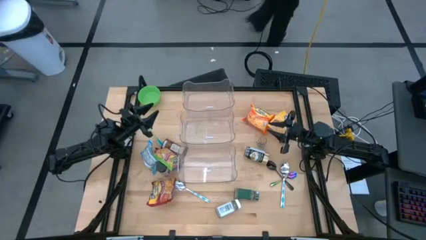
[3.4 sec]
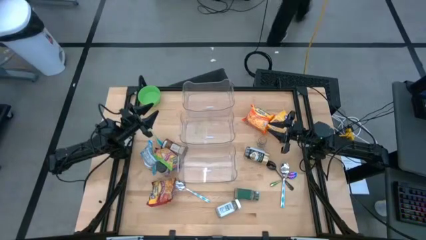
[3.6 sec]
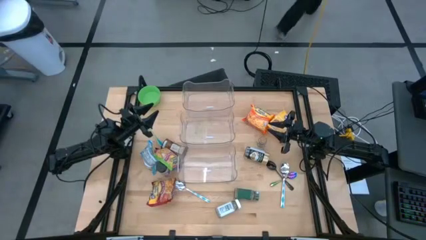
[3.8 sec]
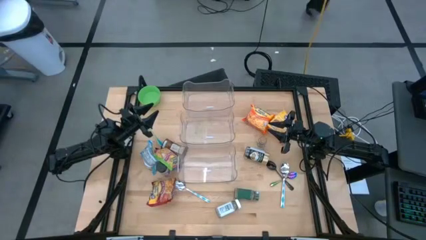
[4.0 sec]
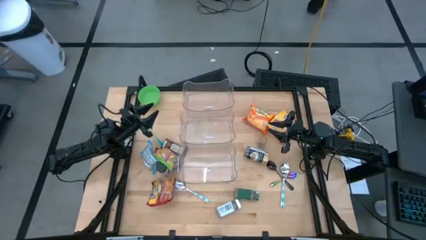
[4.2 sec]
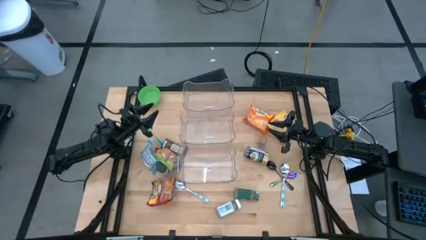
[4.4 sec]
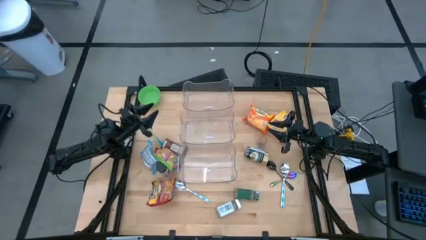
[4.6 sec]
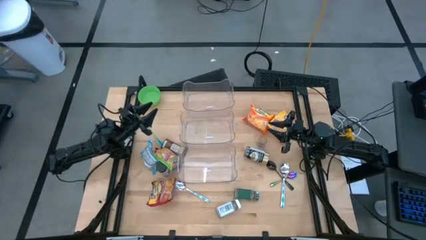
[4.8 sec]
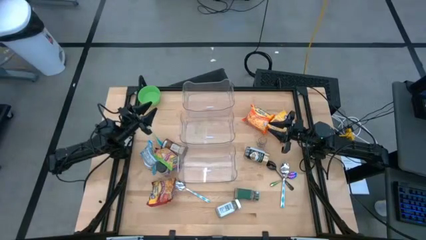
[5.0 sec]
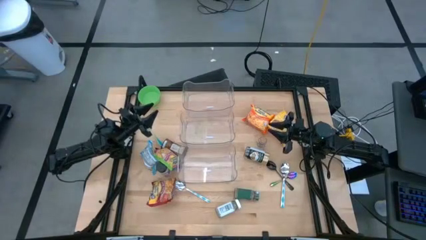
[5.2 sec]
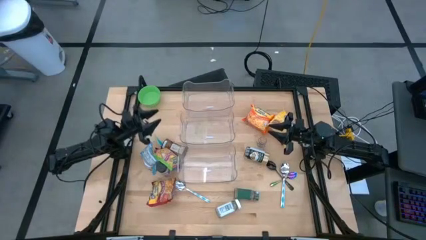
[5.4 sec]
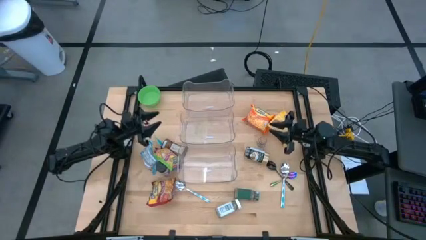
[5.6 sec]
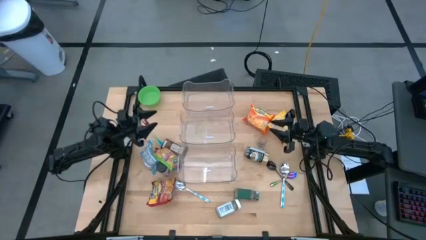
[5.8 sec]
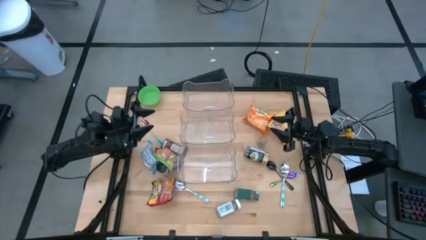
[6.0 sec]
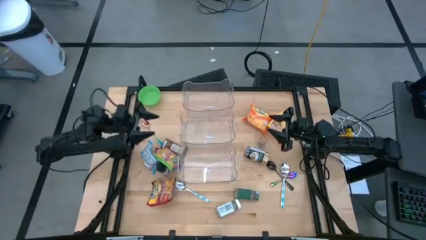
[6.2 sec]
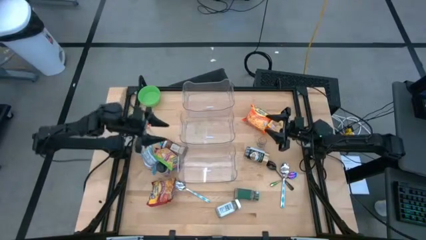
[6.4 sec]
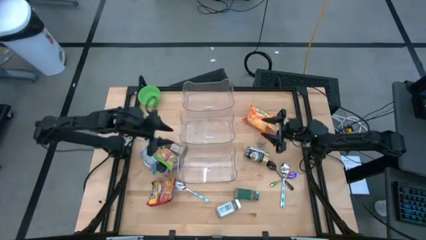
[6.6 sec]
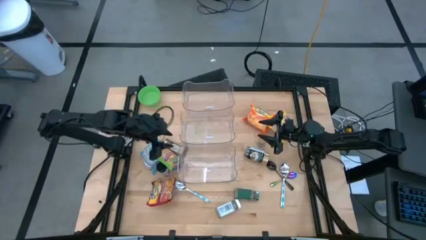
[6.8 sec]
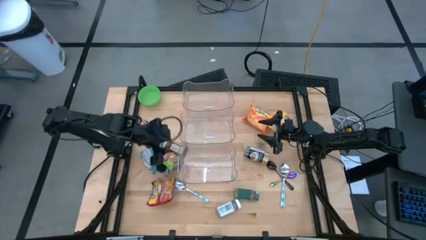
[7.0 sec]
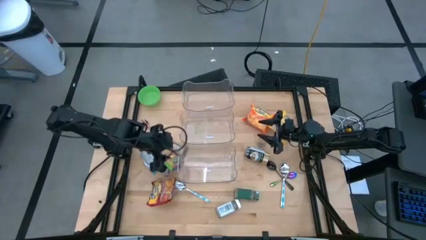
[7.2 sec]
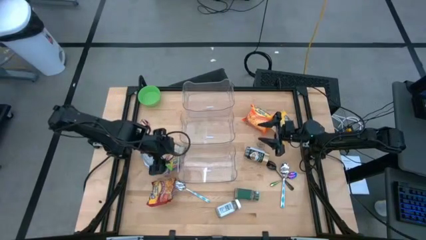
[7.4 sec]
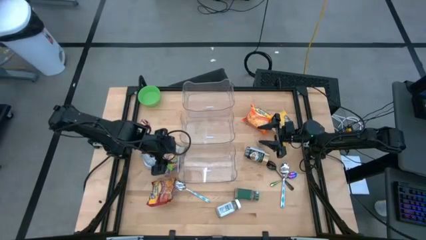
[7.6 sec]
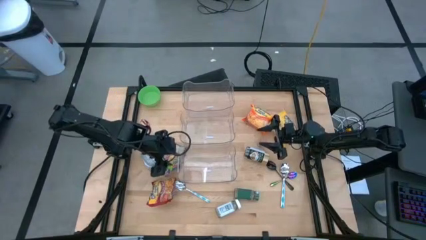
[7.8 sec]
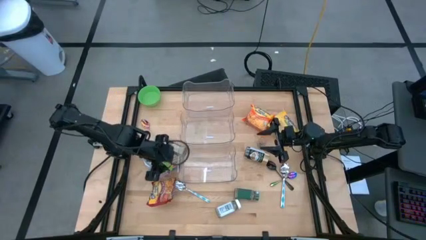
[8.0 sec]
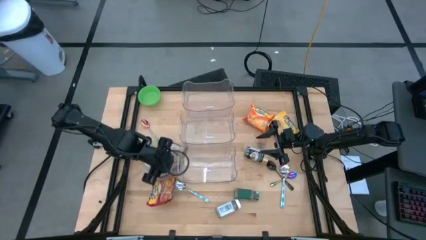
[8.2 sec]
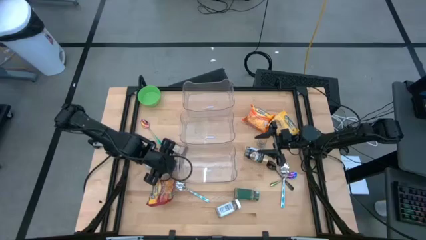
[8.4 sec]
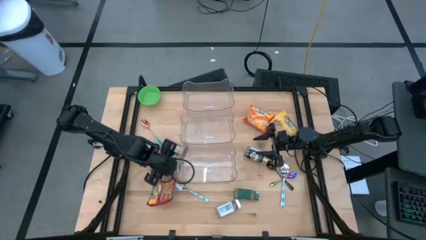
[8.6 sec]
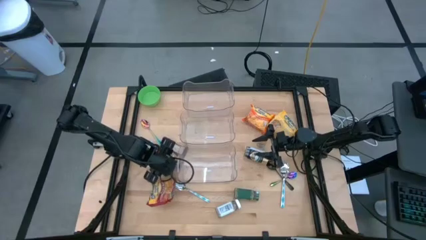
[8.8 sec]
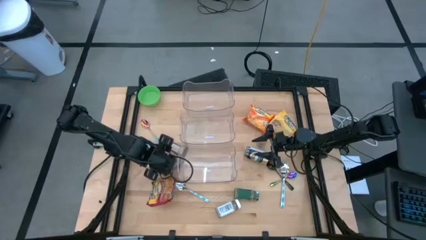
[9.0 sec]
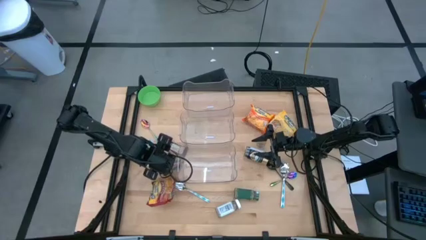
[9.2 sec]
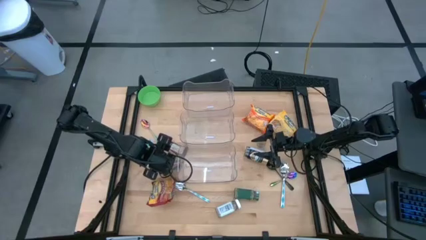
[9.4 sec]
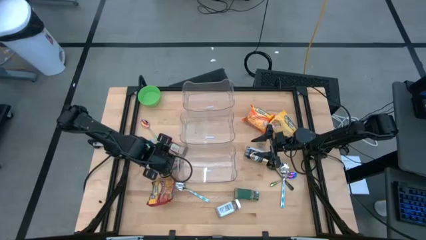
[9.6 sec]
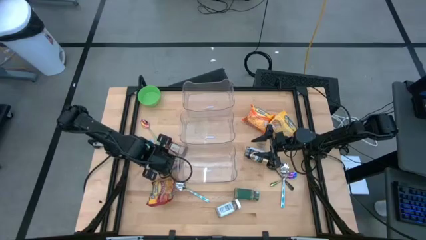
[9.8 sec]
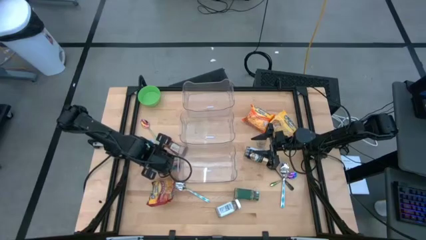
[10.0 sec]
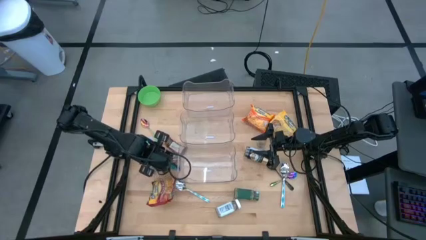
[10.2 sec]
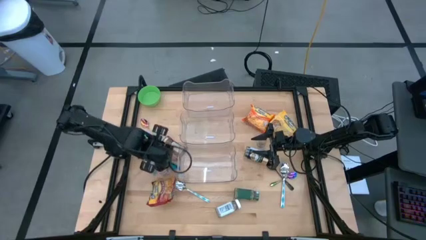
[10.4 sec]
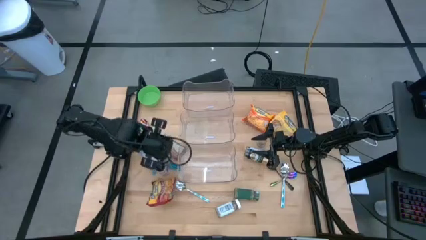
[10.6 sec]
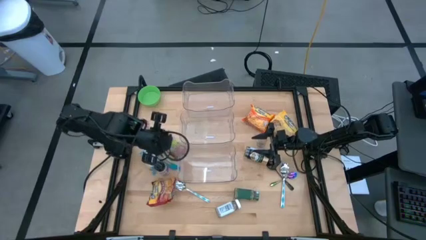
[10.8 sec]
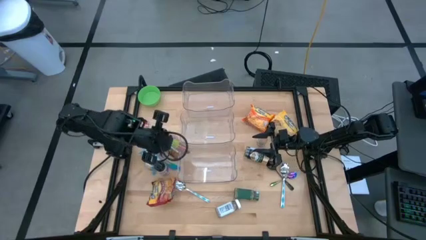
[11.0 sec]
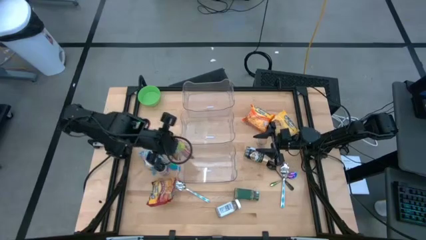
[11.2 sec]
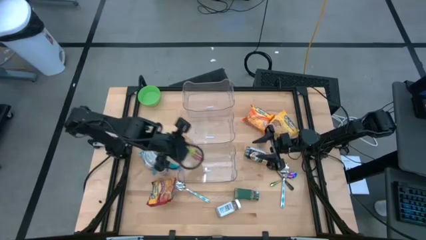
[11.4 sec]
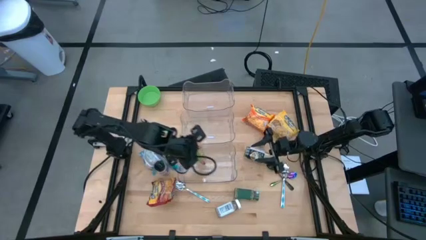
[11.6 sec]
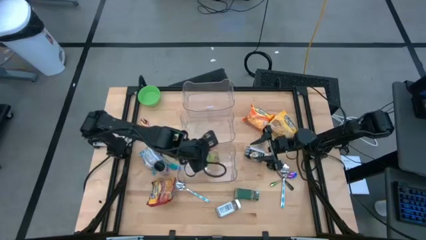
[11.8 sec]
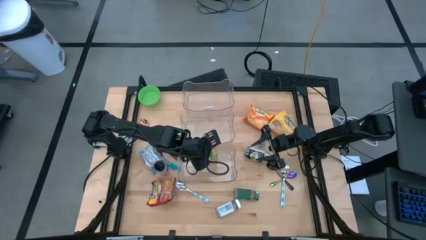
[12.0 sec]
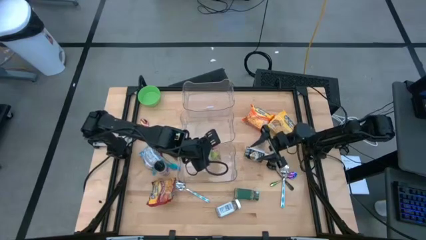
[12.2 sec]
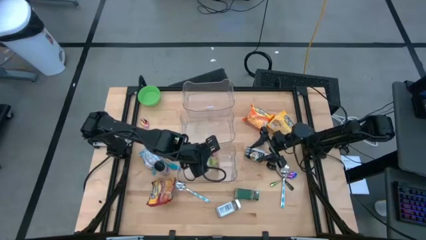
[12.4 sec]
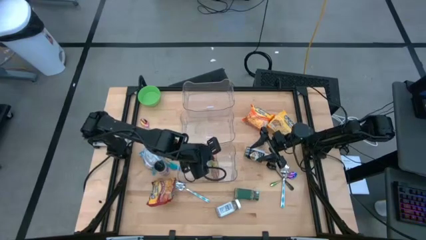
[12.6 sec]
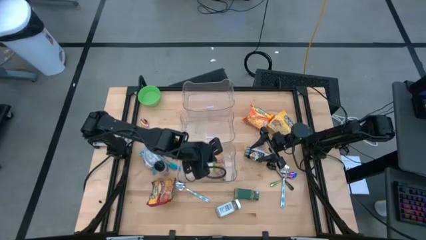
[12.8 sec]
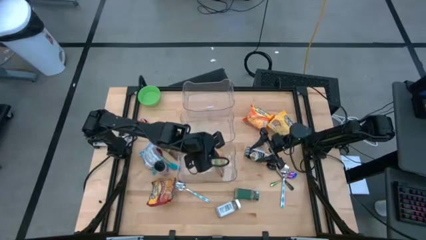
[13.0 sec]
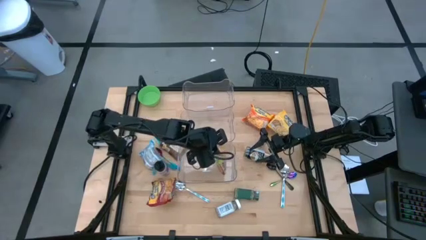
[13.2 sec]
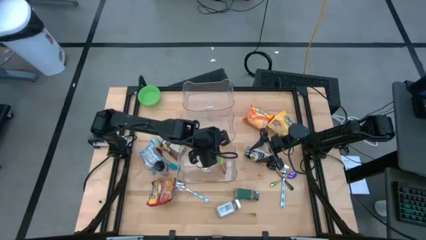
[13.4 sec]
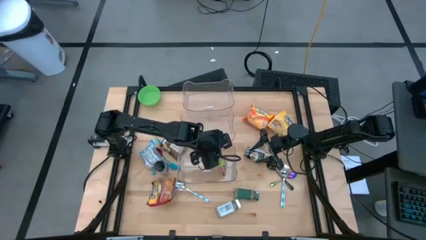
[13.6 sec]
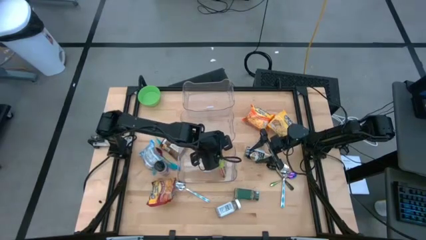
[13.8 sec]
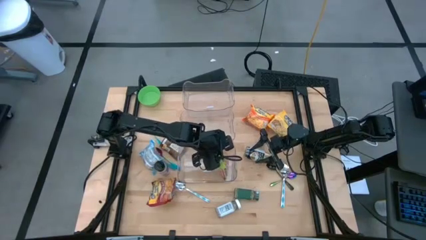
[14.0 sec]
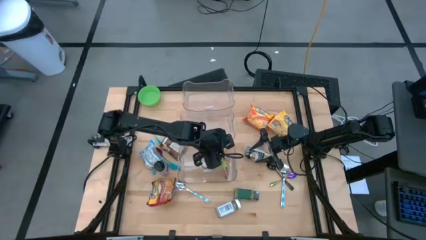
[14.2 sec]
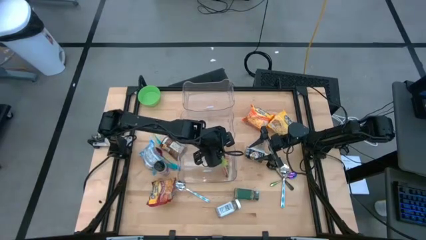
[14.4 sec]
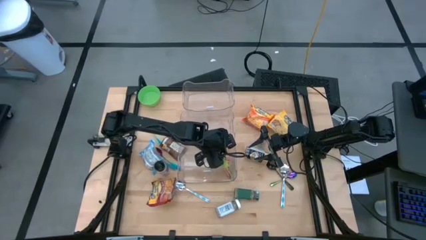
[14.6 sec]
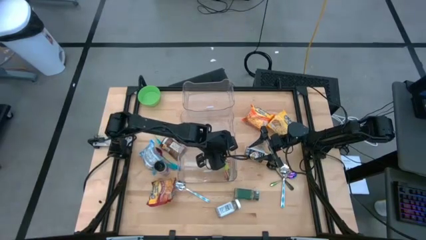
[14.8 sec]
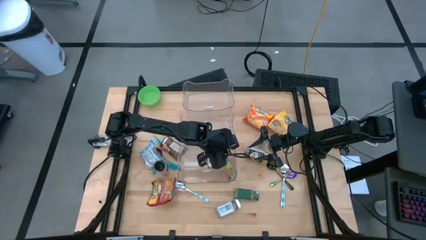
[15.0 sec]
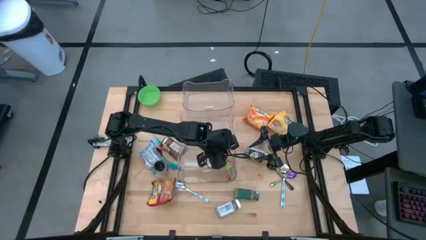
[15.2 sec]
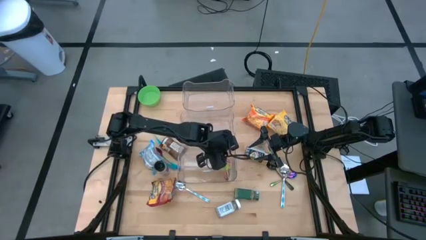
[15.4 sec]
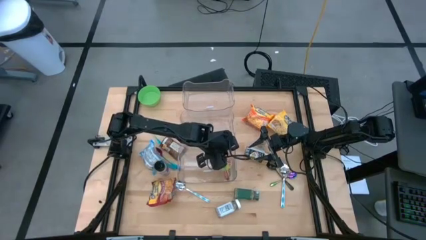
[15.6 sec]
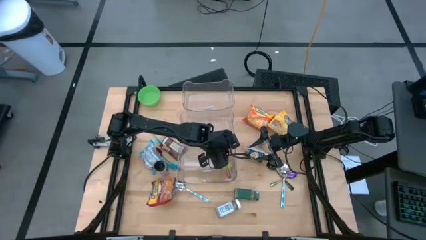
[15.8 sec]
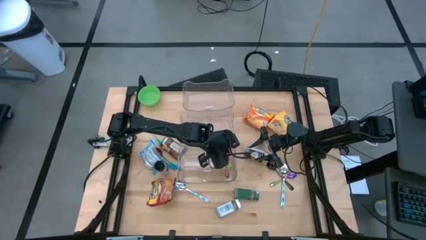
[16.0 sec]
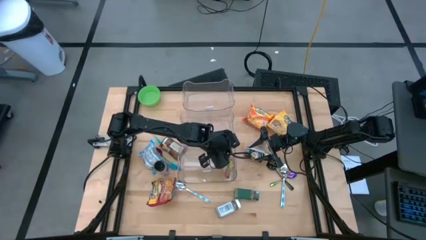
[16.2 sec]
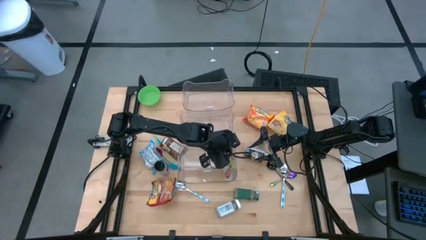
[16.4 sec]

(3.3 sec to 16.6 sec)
Task: Pick & Place Food Item
Put the green noodle pack into the bottom transparent bin

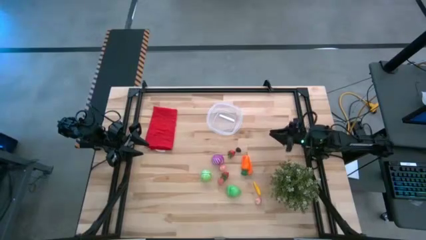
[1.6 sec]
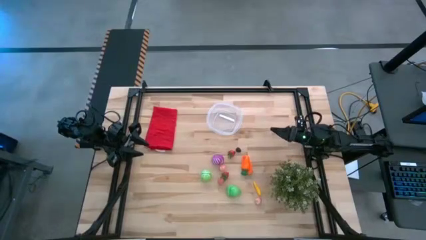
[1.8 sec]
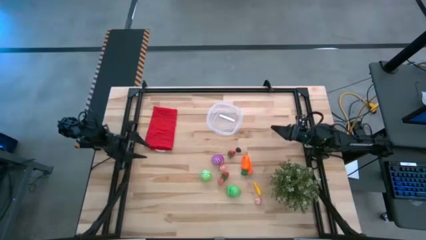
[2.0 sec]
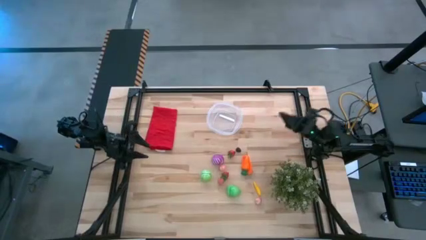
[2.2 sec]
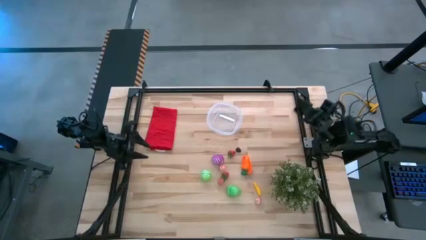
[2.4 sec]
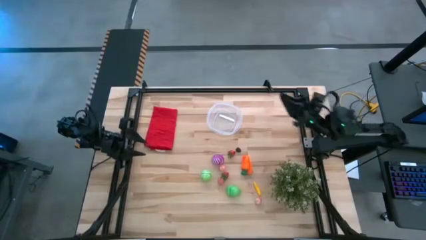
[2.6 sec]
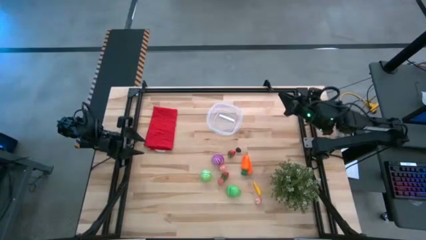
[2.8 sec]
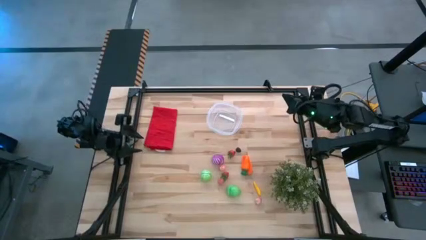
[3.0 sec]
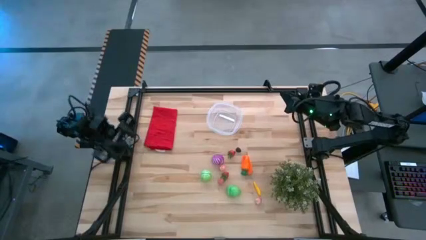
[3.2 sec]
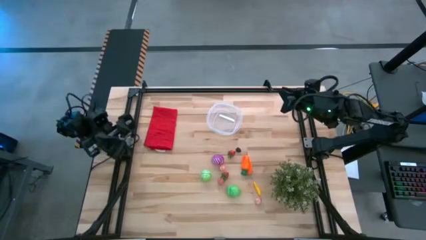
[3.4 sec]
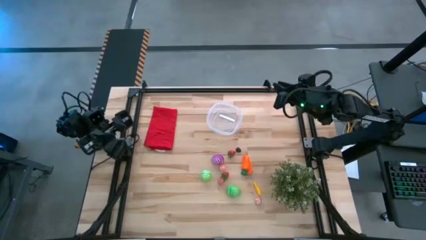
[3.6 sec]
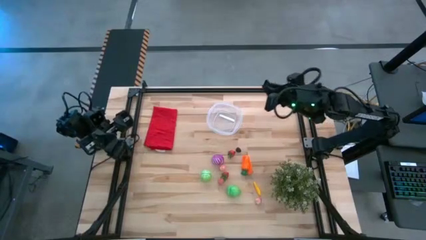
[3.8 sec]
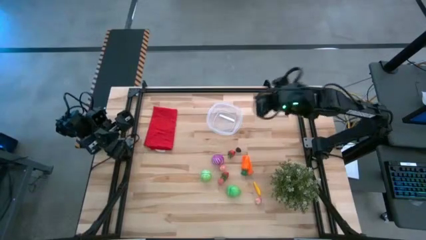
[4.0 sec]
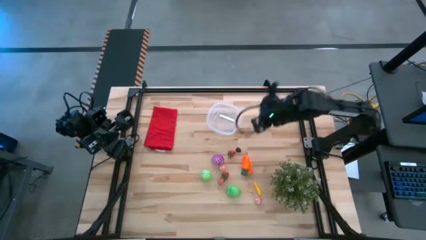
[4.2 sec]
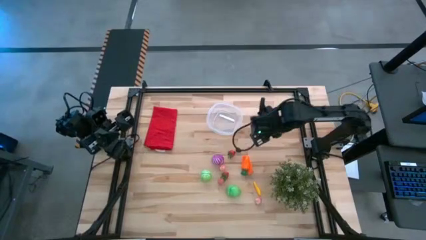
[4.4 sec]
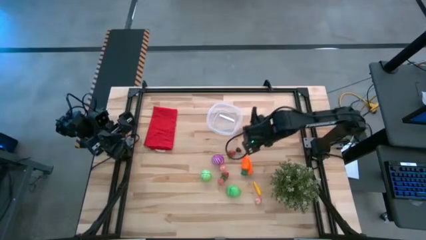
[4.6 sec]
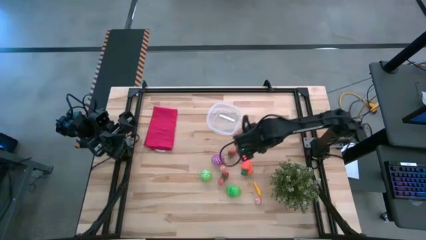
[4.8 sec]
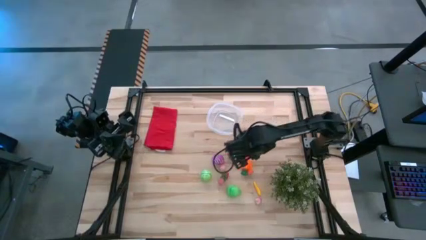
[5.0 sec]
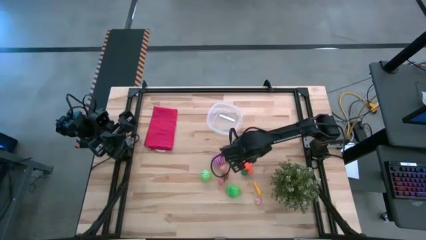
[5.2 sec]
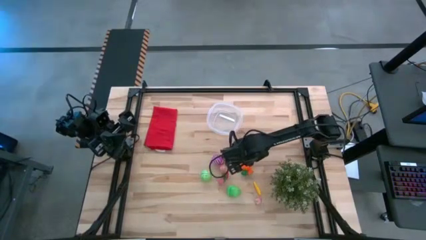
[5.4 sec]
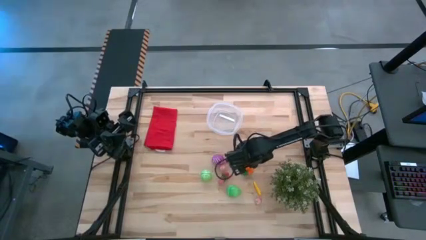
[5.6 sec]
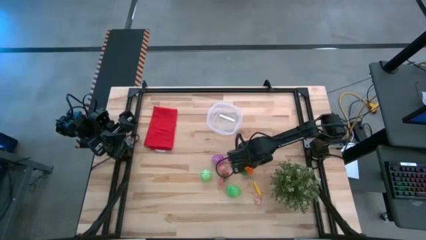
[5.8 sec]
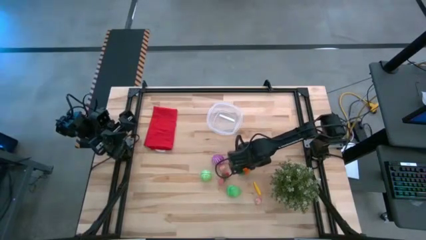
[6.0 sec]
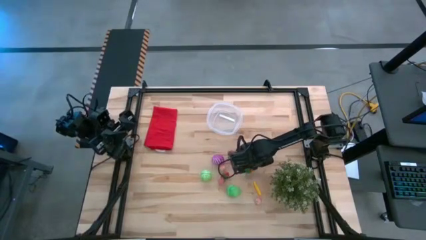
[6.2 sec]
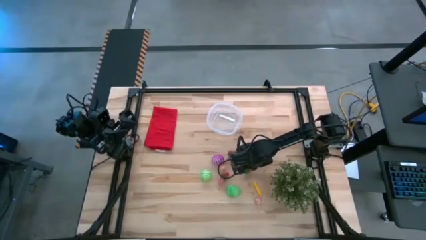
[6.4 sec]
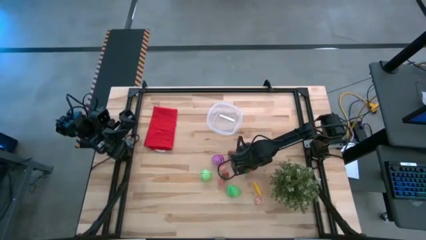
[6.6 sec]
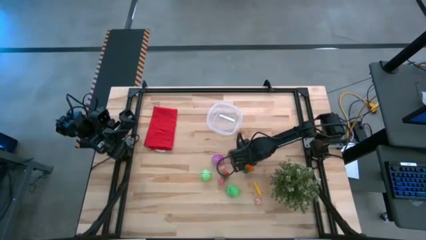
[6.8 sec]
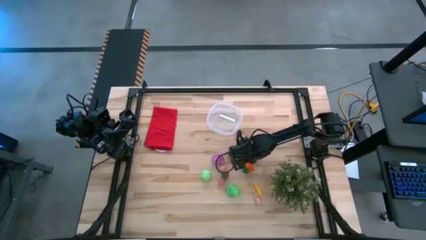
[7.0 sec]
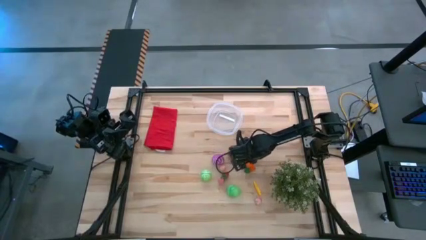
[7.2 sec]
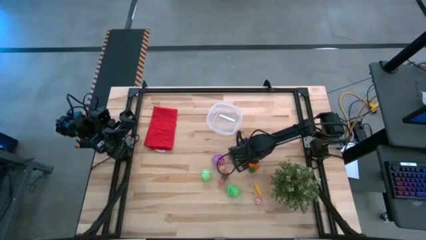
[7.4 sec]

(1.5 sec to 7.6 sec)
Task: Pick and placing Produce into tupperware
Put the orange carrot into the transparent bin
